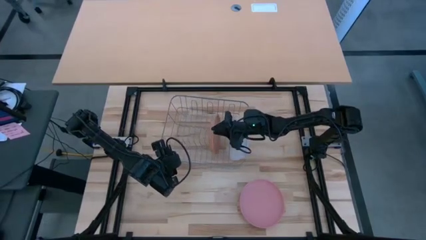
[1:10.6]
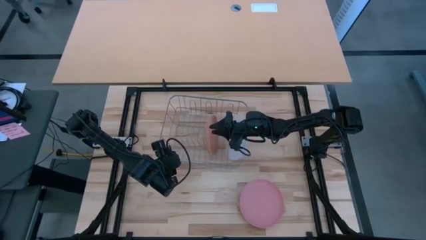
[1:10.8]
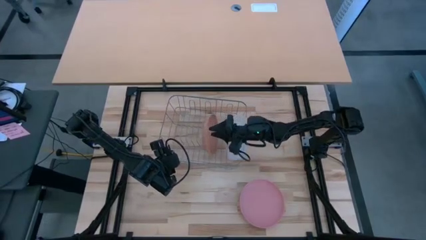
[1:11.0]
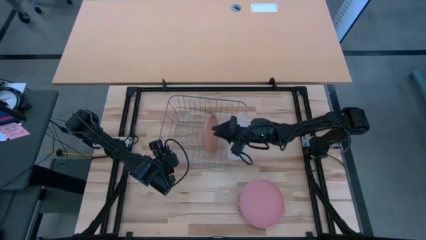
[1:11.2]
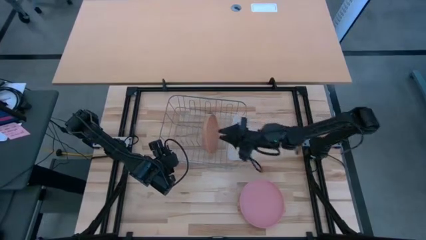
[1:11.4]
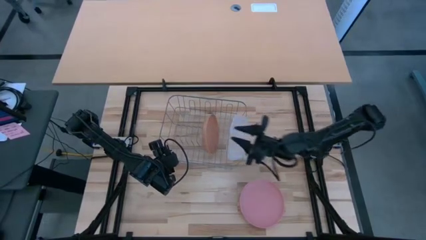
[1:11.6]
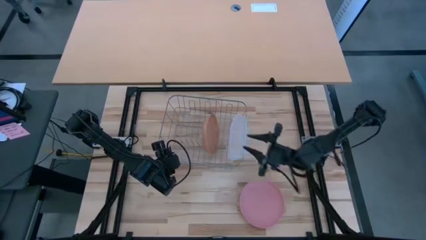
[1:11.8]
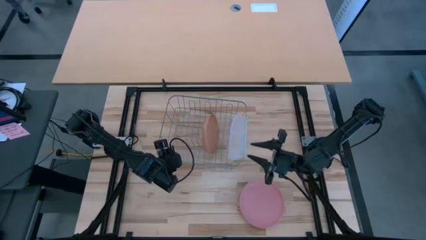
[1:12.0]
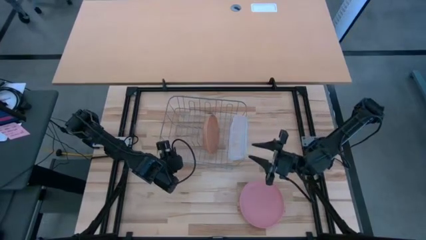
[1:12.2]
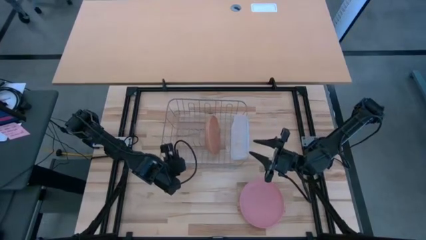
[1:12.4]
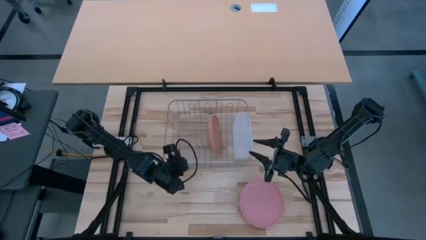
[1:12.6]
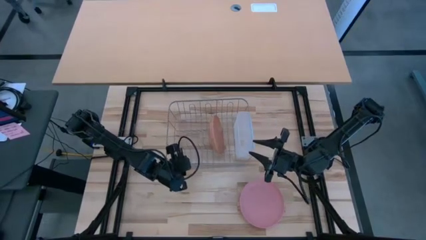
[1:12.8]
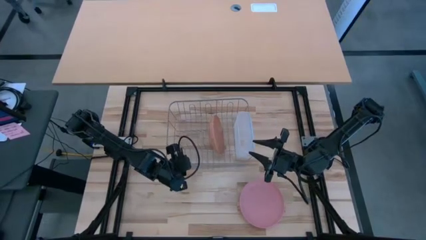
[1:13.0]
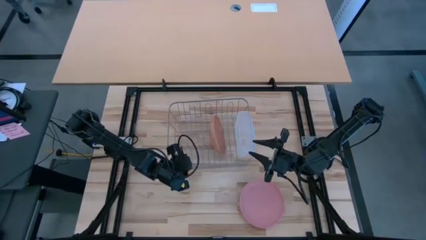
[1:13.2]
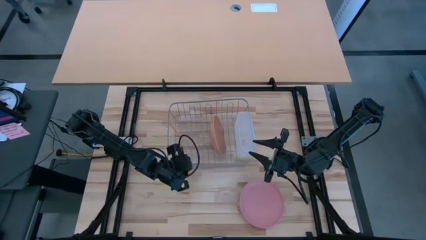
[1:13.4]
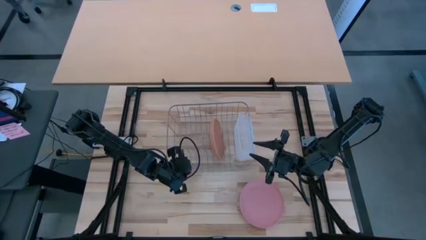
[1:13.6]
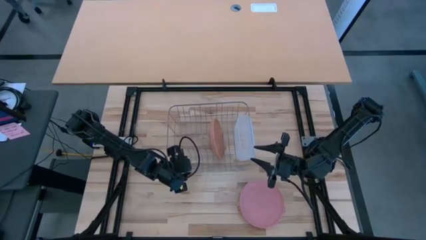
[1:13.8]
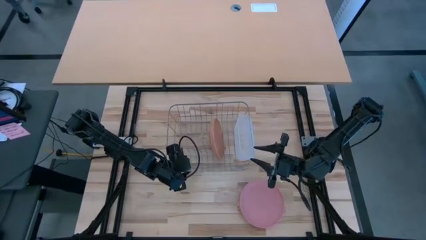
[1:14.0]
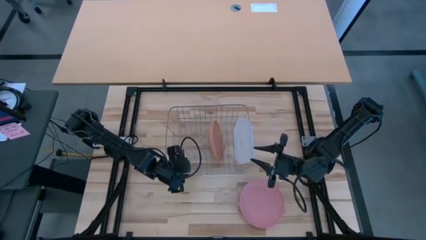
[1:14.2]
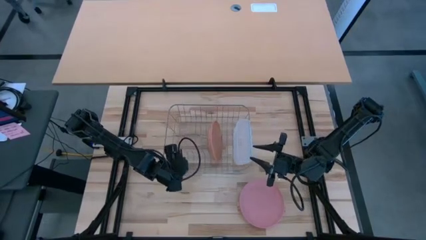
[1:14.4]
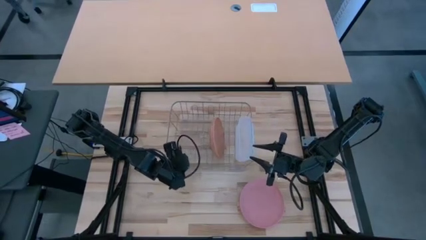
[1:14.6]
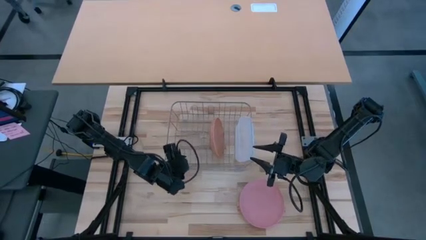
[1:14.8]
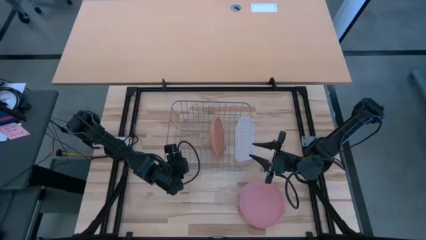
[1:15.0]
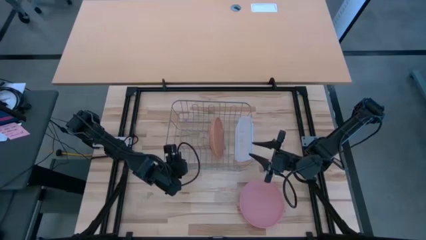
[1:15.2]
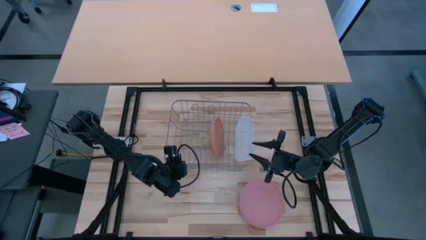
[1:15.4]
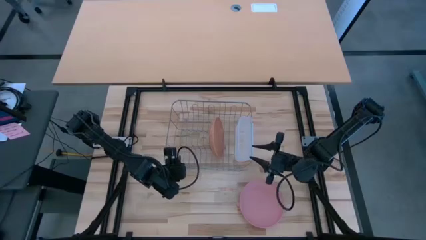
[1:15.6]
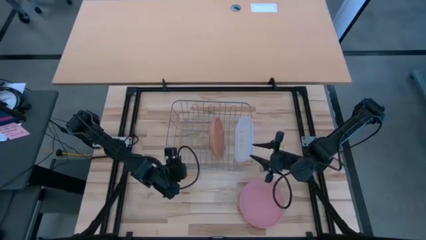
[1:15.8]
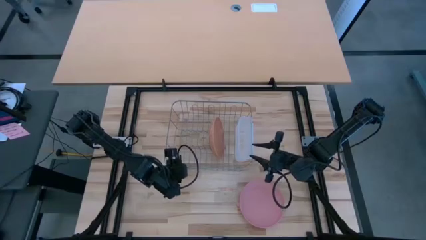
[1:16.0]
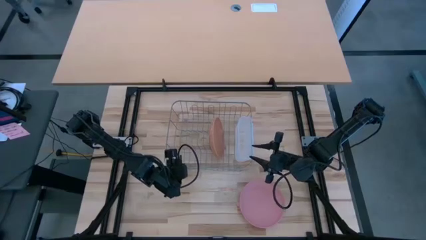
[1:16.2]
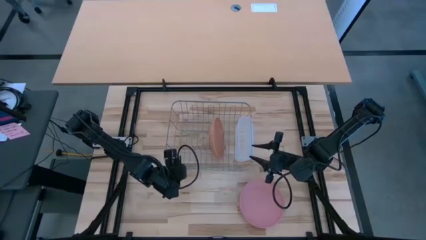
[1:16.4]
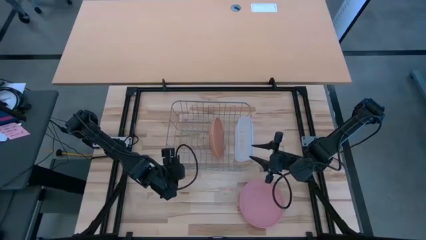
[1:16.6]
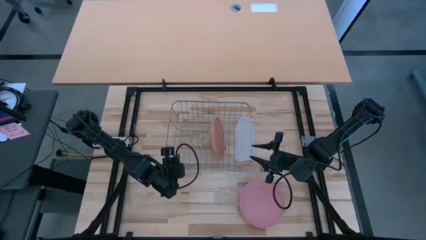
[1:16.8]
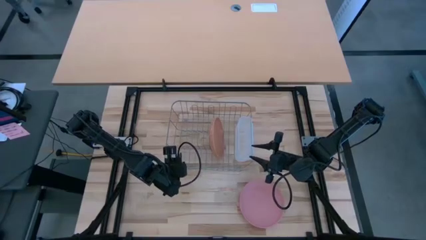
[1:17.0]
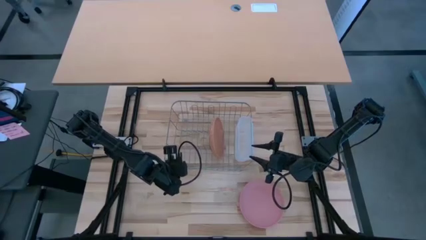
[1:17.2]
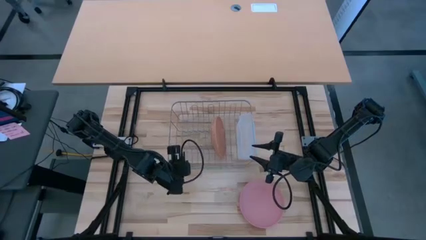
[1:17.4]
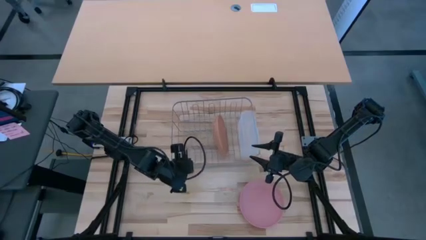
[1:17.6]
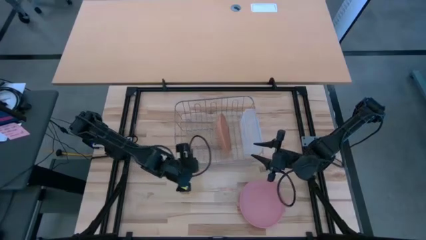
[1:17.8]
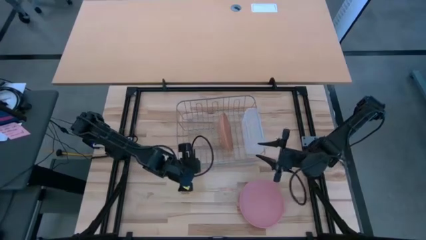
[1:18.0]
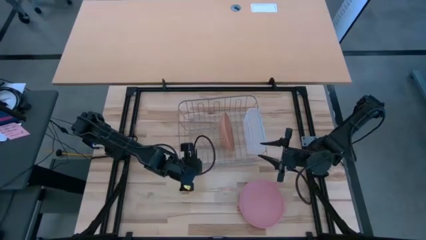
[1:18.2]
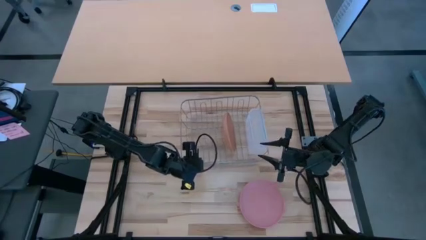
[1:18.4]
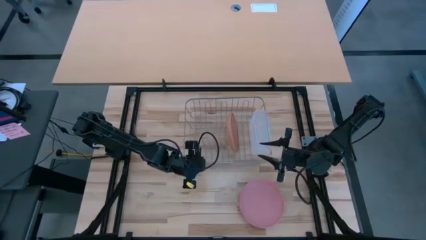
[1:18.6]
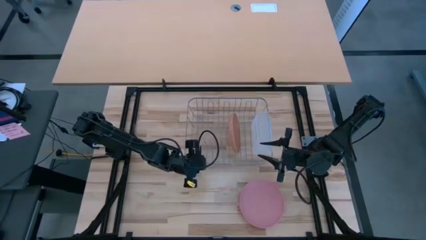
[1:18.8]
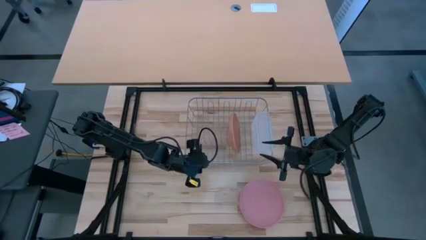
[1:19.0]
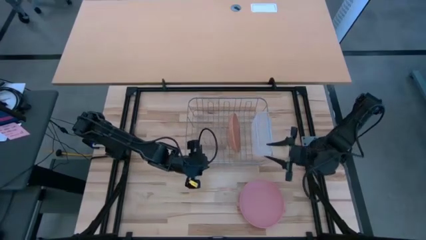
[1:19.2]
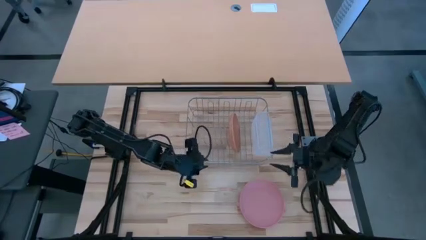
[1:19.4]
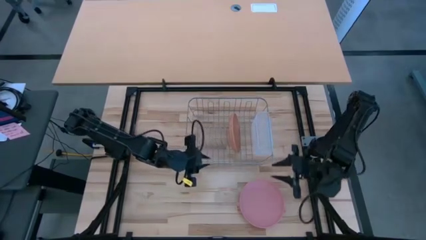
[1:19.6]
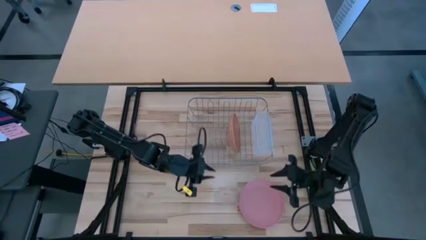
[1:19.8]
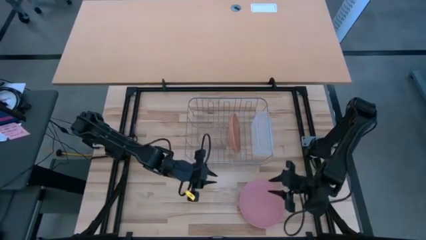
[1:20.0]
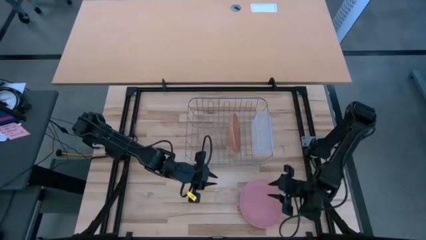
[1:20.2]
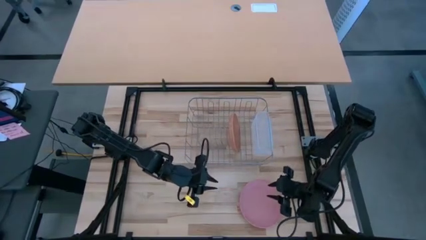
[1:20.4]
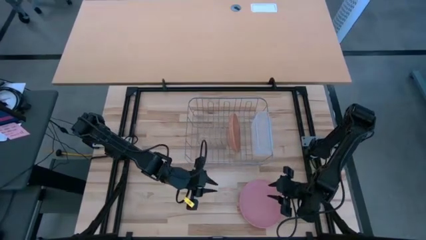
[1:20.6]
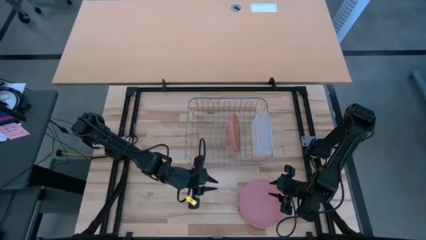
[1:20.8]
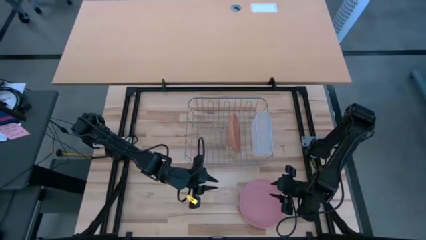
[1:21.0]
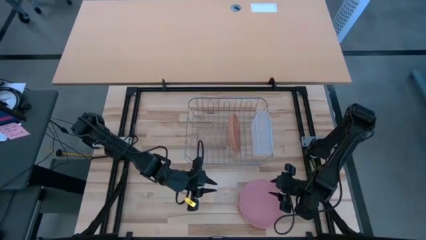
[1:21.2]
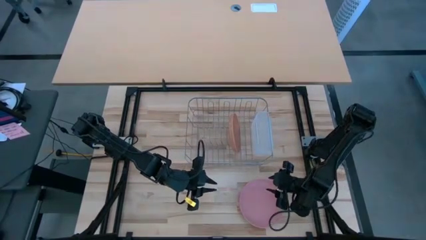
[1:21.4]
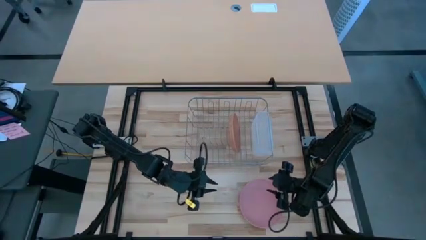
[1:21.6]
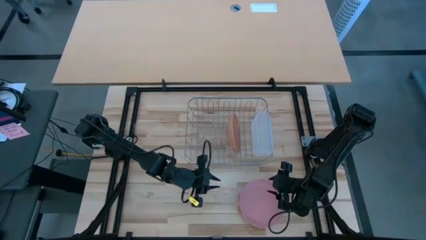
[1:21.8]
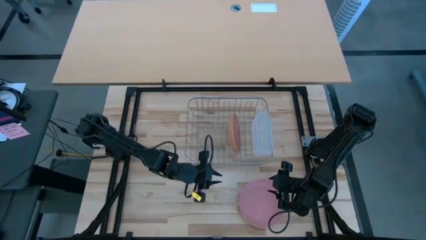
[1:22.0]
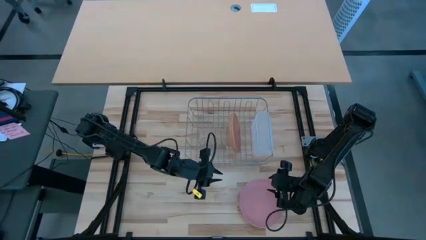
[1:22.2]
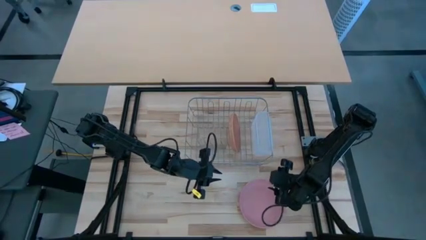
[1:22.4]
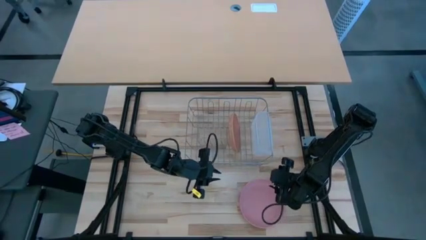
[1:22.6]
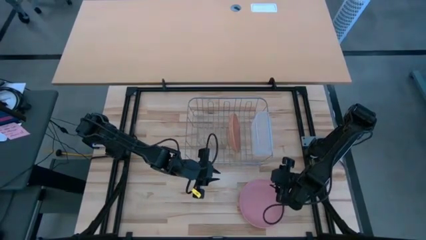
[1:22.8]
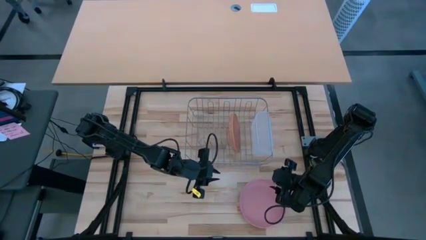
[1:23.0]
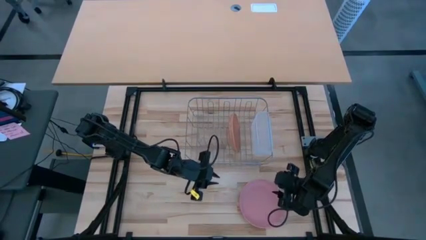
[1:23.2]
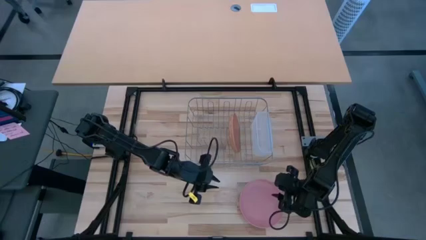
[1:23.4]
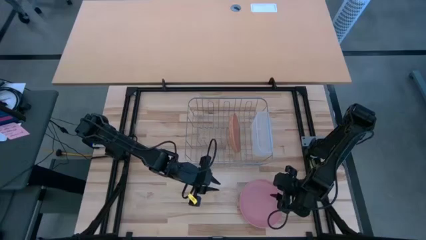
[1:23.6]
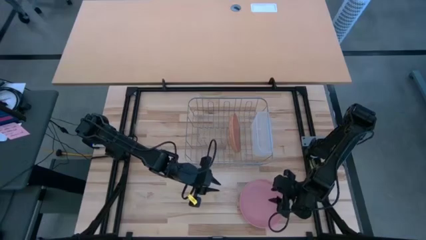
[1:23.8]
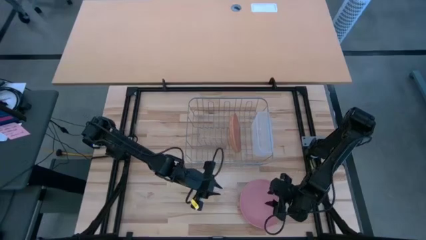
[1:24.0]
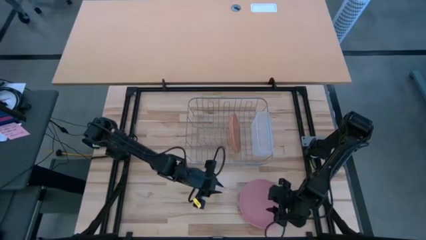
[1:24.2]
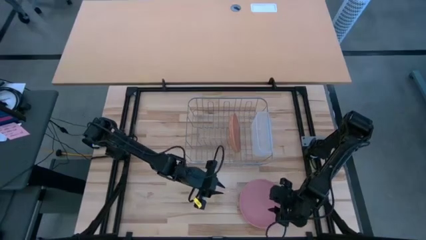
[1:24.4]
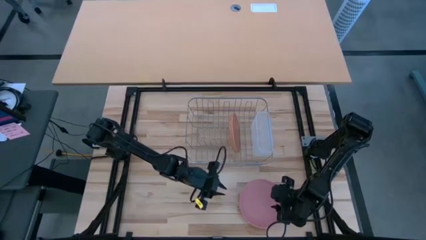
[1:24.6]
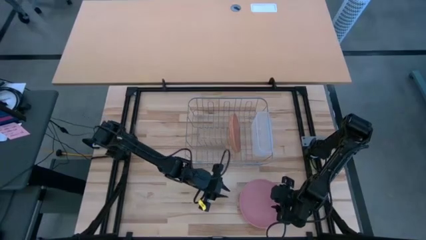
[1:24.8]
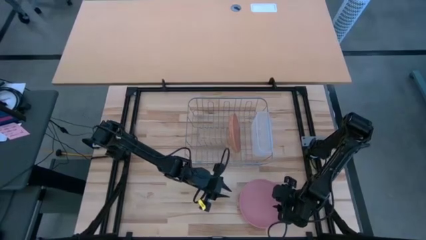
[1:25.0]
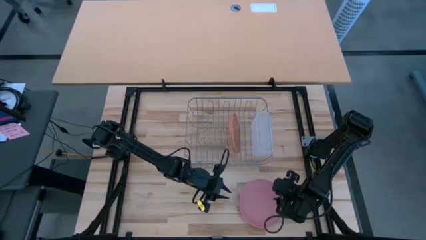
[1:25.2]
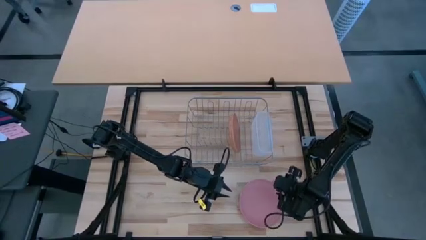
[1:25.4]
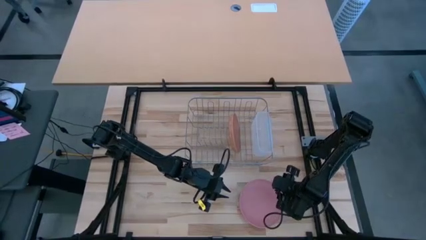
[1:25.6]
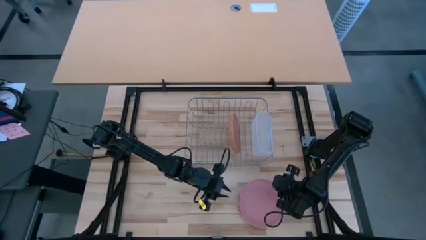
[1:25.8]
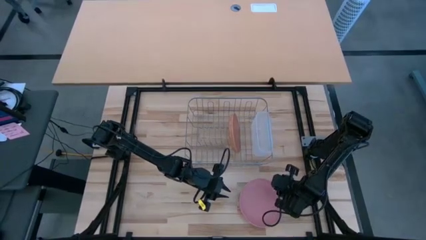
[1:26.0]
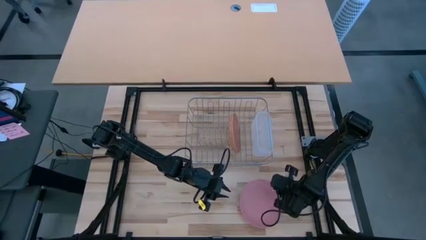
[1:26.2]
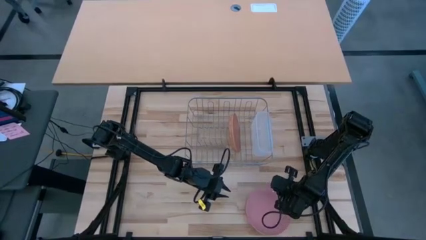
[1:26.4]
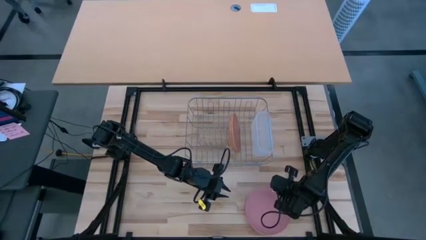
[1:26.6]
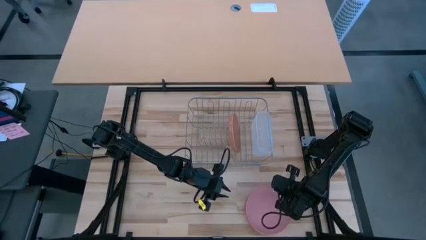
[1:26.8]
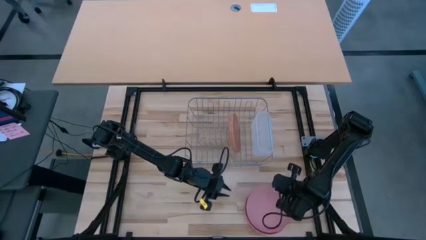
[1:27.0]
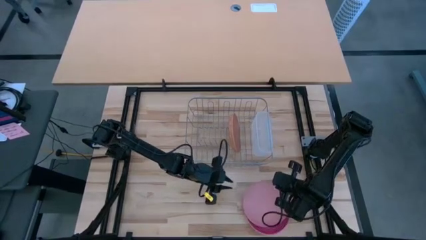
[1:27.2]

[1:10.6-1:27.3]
Task: Sort dishes
Put the light pink plate in the dish rack
